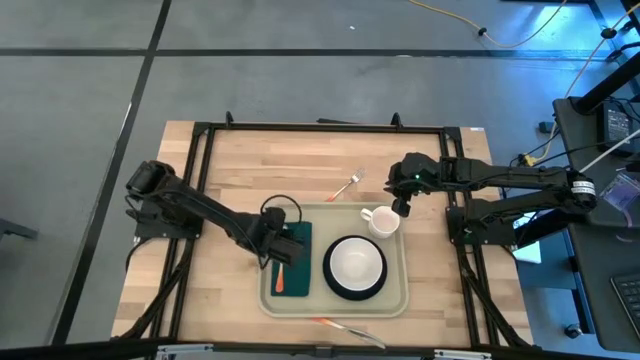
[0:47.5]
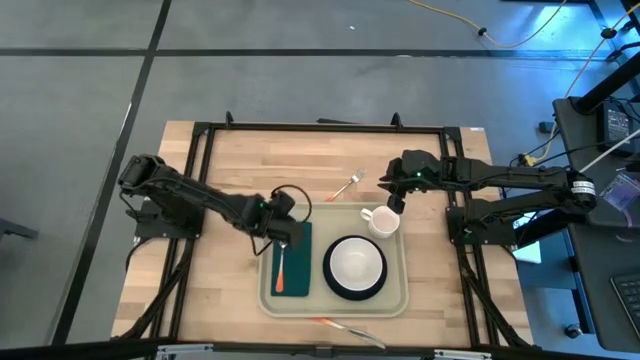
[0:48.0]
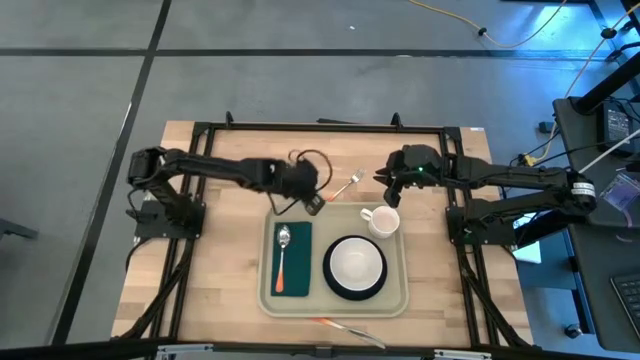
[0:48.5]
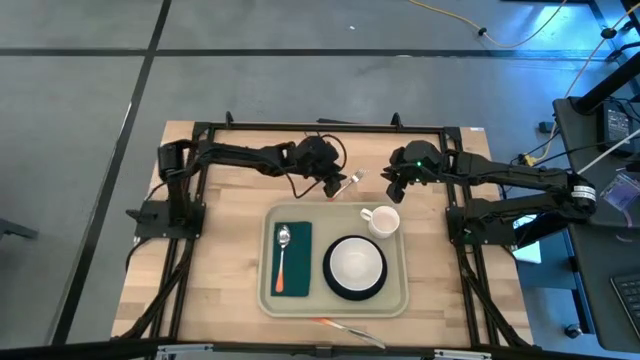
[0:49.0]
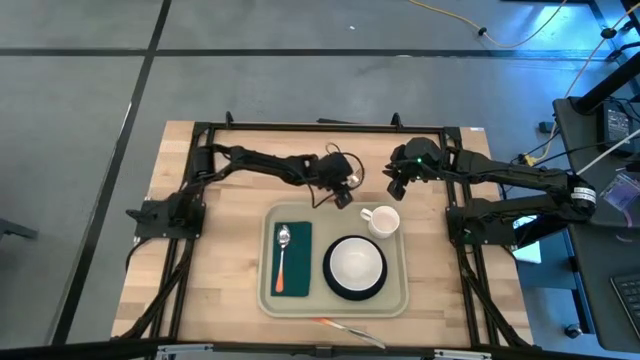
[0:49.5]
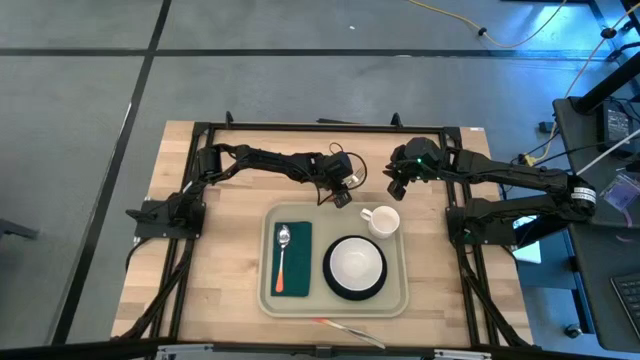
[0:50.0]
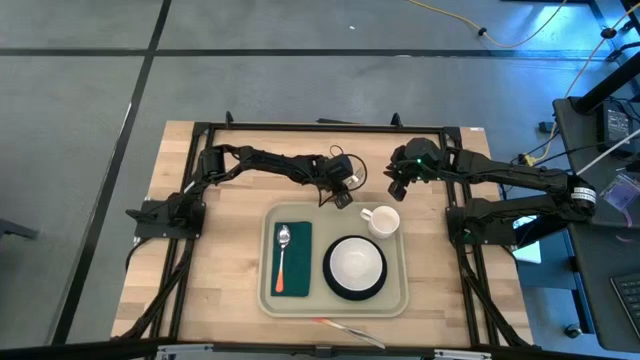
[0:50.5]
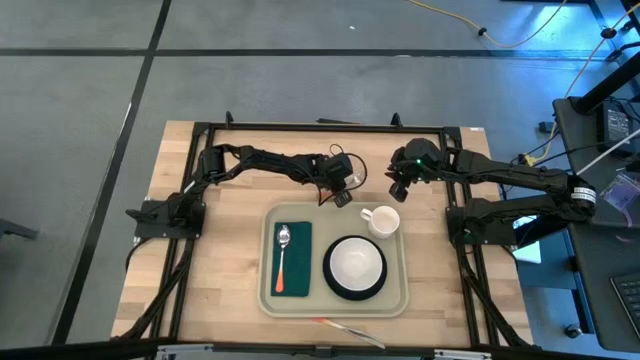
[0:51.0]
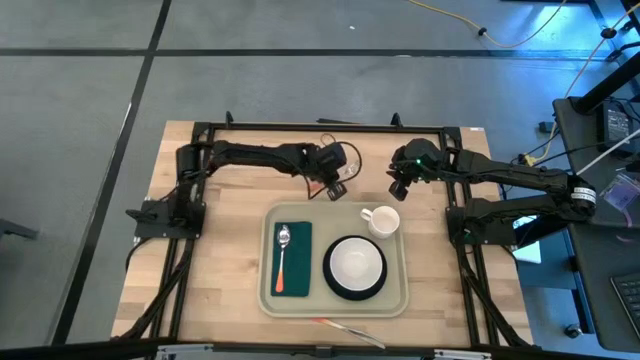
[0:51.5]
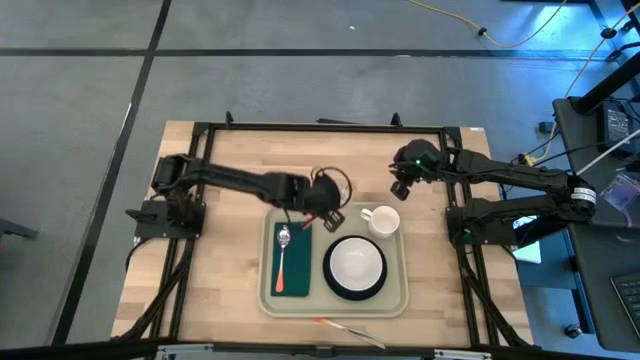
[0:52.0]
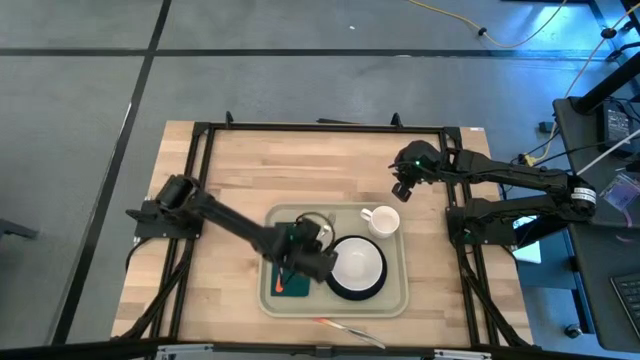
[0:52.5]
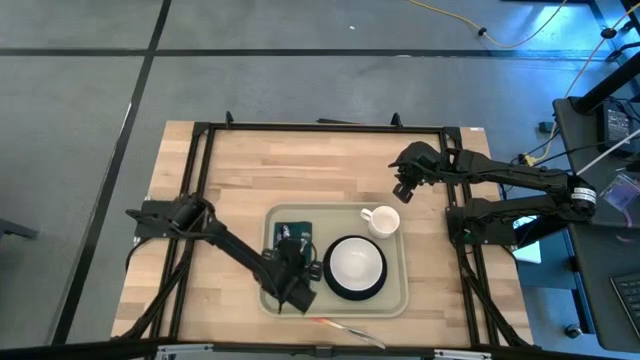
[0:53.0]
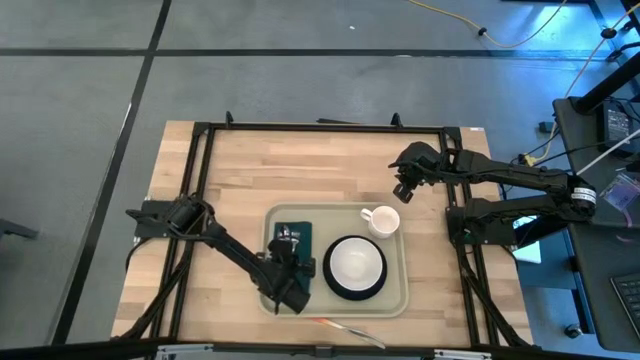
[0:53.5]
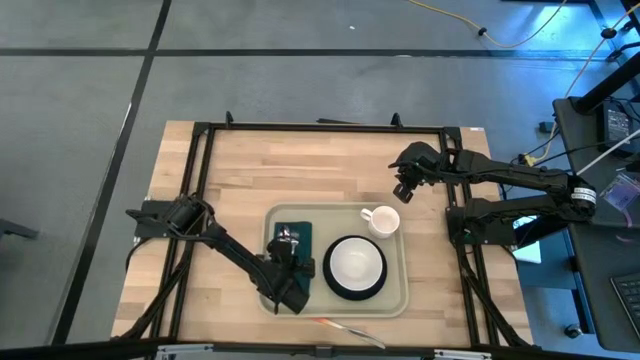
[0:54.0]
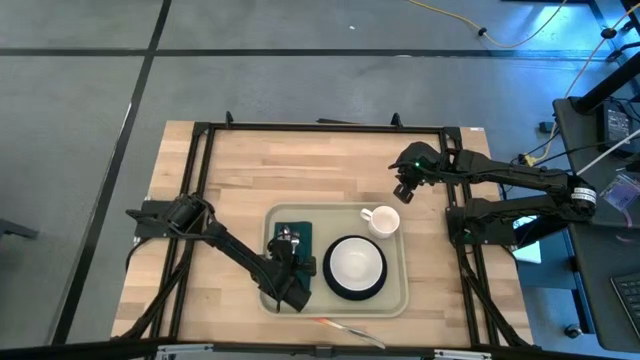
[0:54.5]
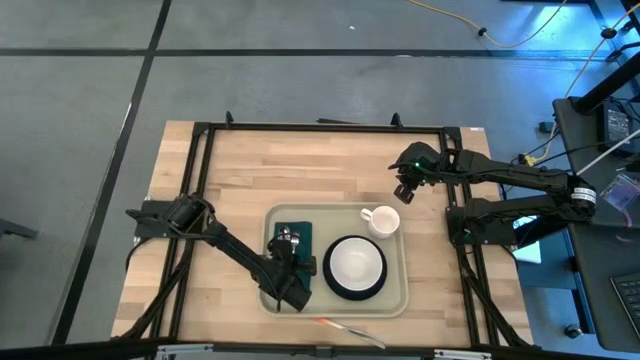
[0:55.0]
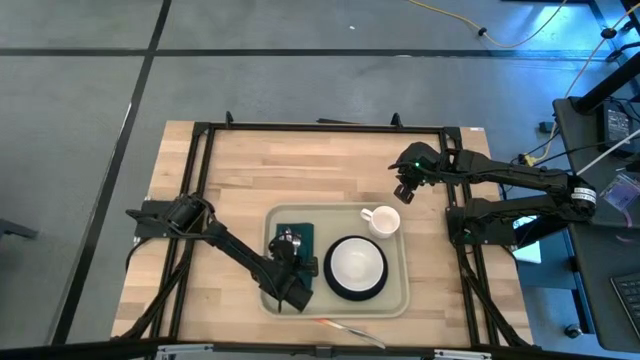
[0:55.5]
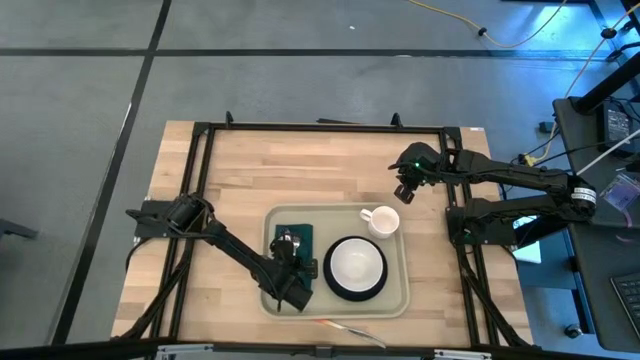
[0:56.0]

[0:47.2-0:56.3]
Task: Set up tray
Put the orange fork on the green napkin

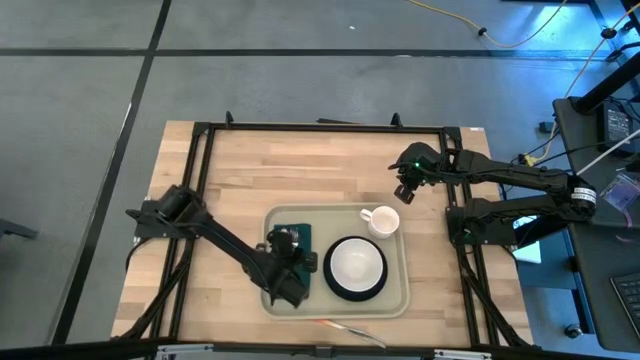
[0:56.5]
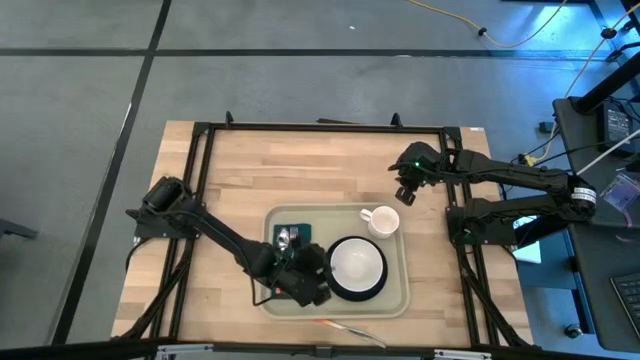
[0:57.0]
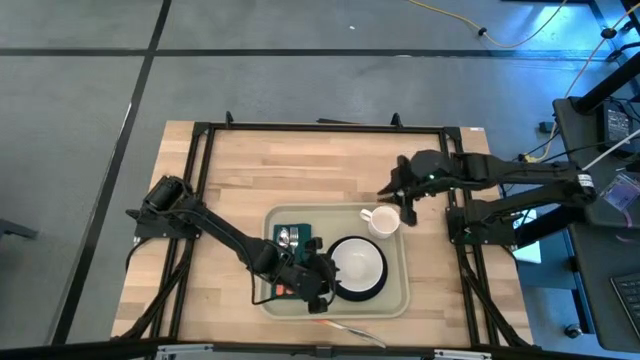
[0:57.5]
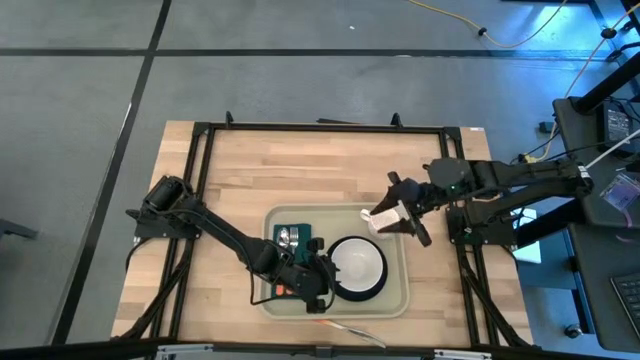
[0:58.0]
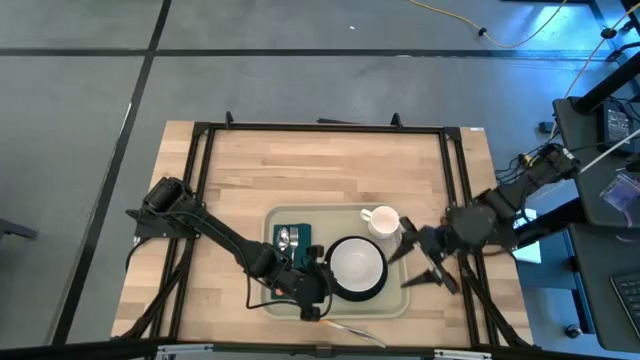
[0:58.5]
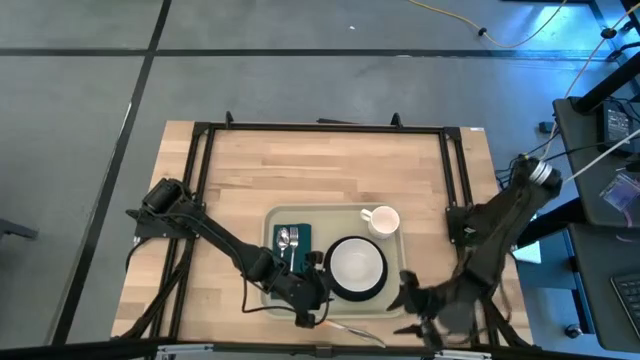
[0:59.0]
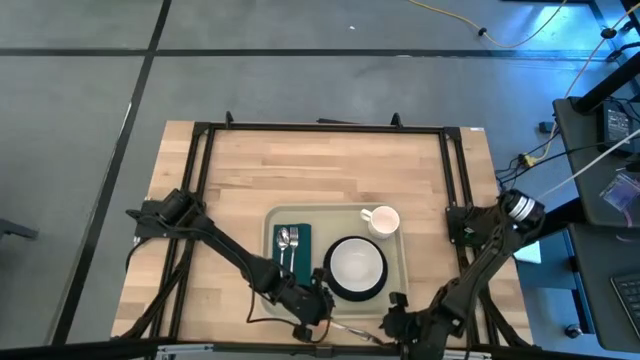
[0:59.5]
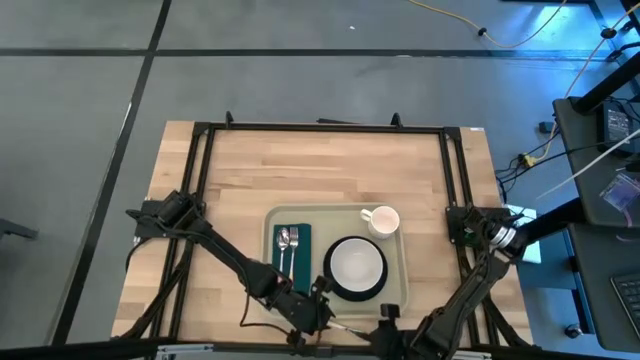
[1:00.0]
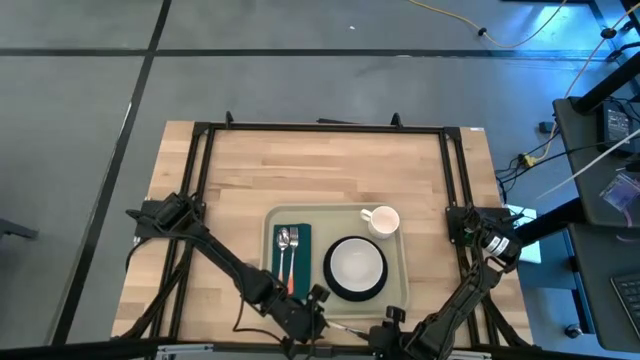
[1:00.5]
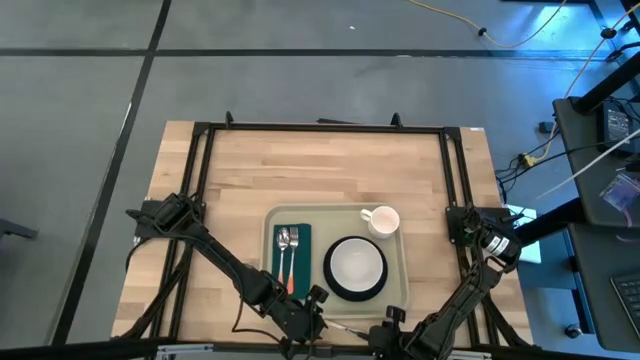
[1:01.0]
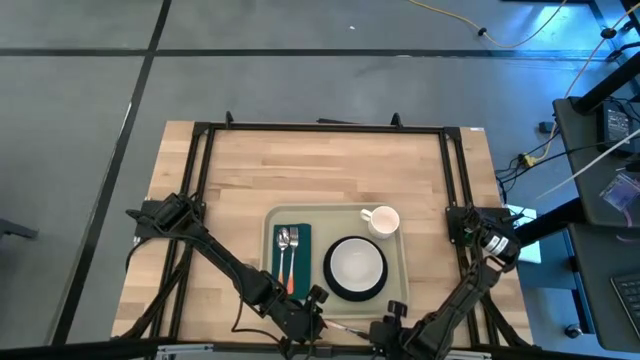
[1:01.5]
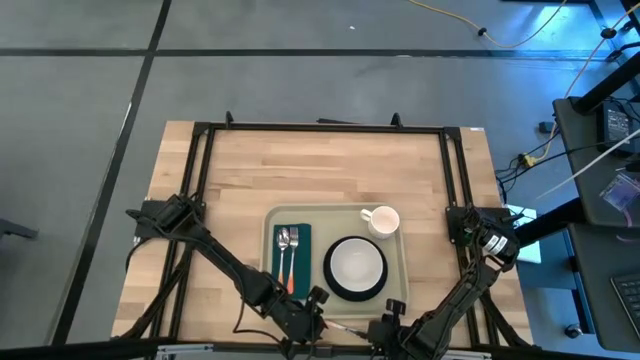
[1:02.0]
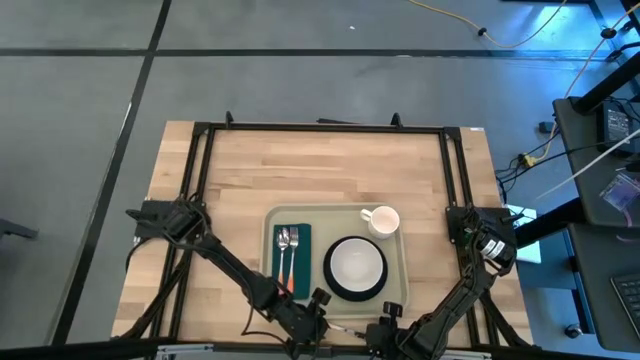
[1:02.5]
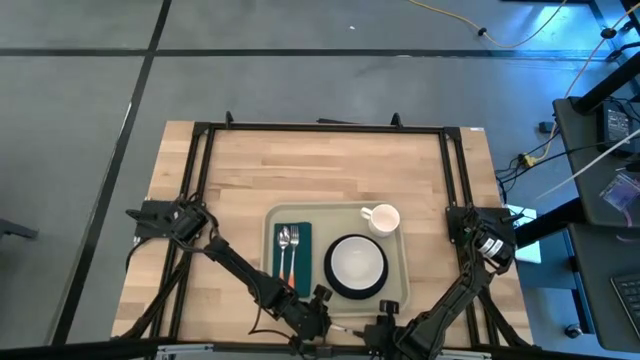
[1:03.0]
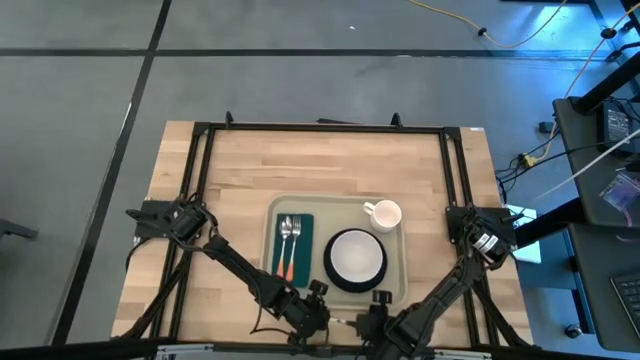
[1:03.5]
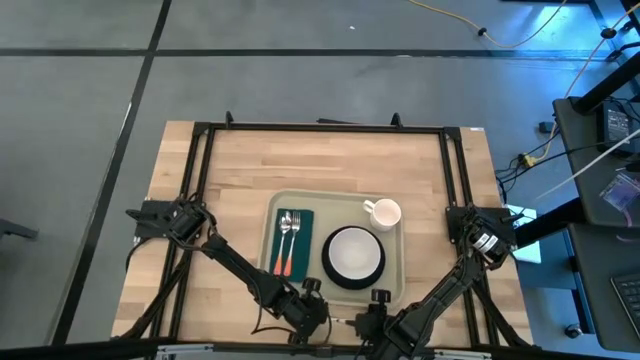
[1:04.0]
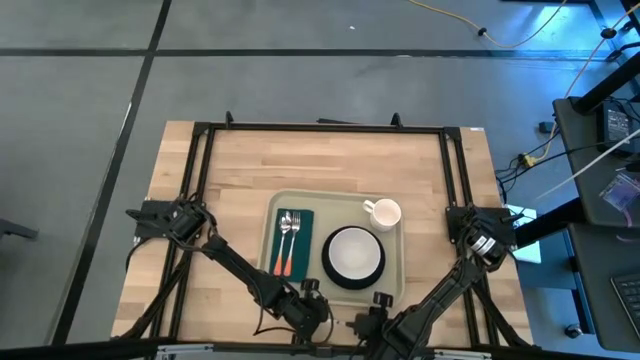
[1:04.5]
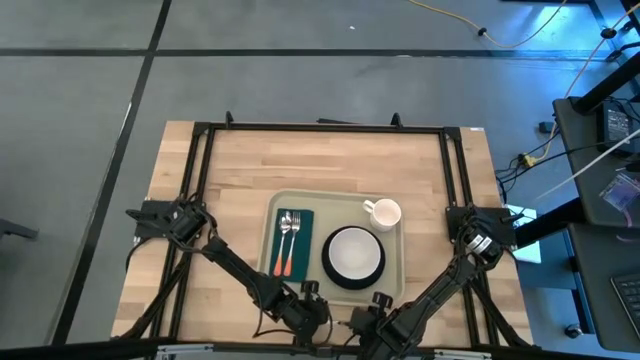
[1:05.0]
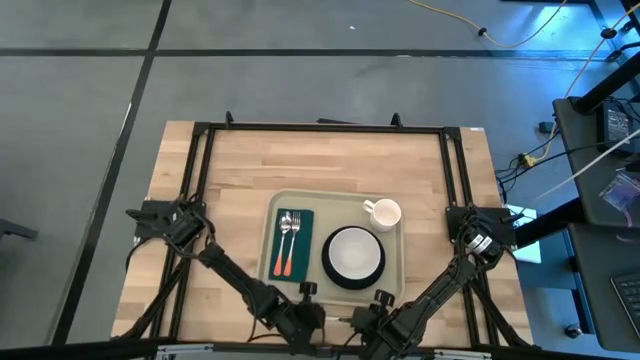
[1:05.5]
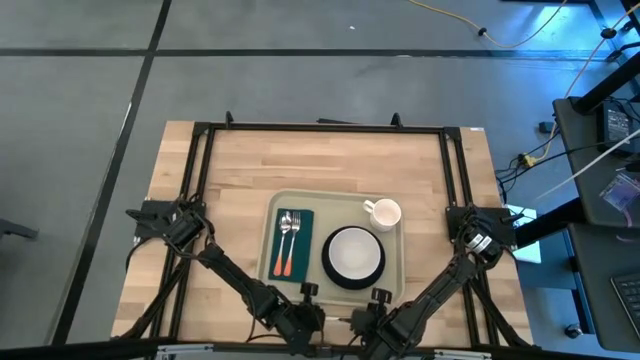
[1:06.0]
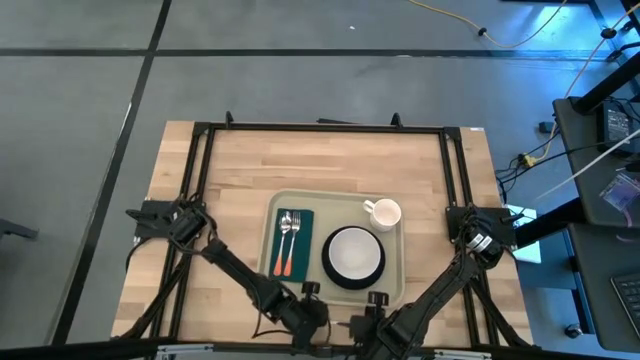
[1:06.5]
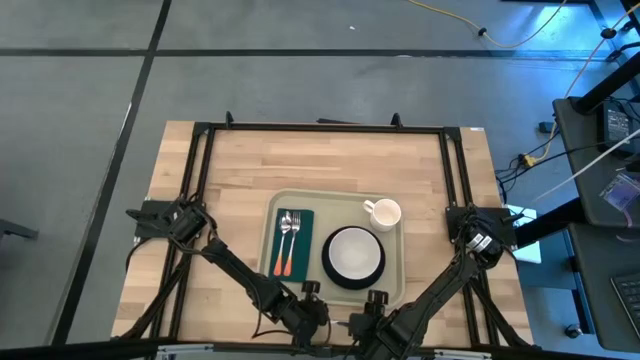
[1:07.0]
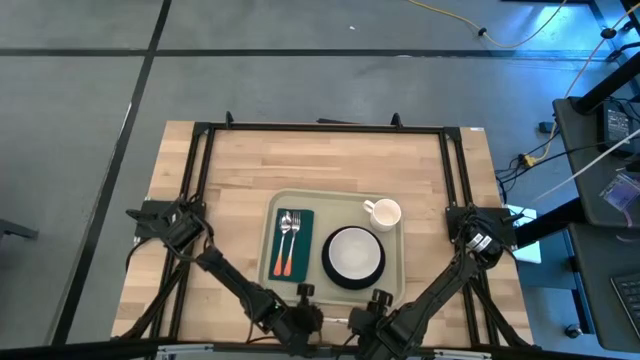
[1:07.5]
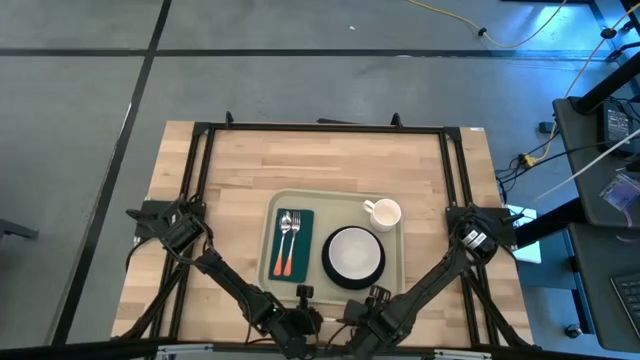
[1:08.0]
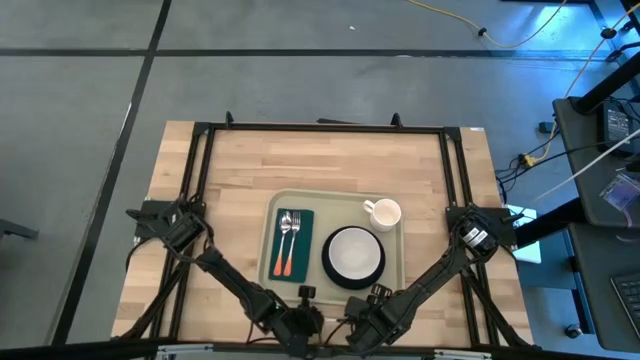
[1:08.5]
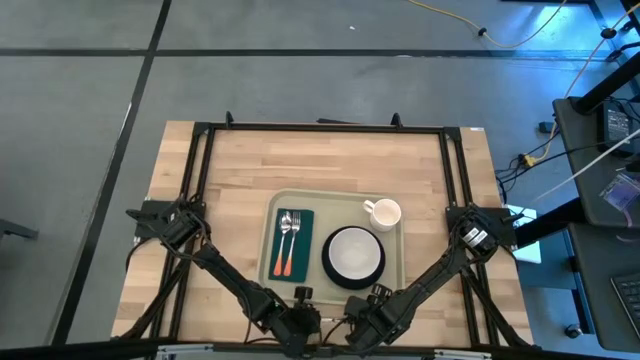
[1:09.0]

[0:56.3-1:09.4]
Put the orange knife on the green napkin
